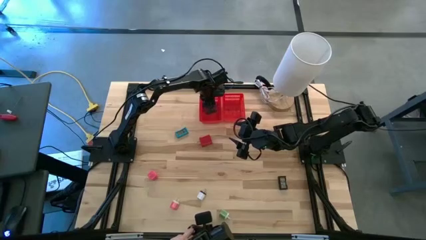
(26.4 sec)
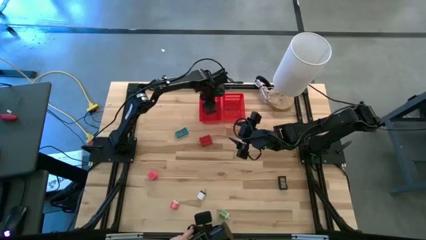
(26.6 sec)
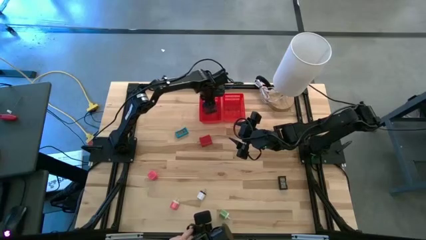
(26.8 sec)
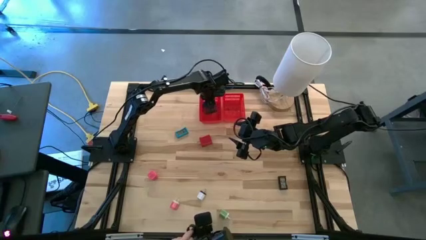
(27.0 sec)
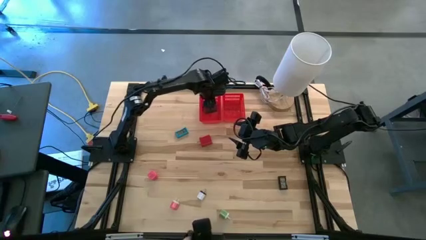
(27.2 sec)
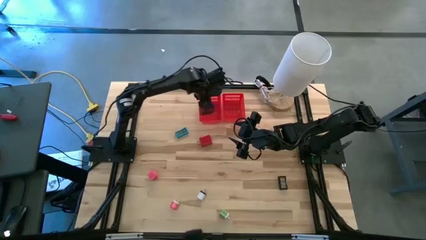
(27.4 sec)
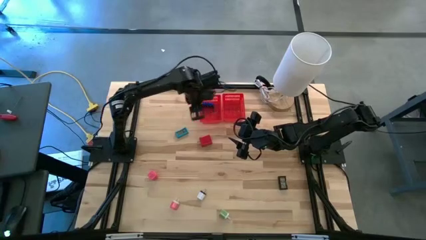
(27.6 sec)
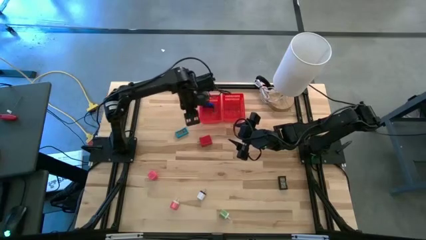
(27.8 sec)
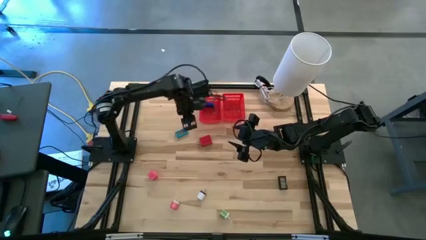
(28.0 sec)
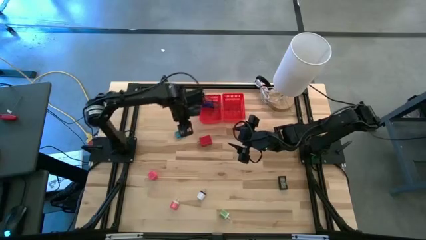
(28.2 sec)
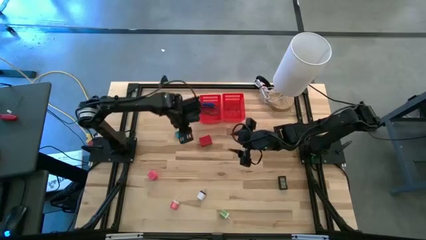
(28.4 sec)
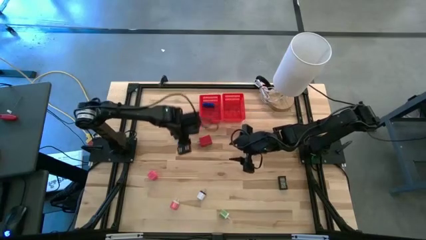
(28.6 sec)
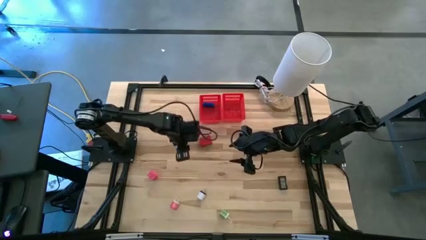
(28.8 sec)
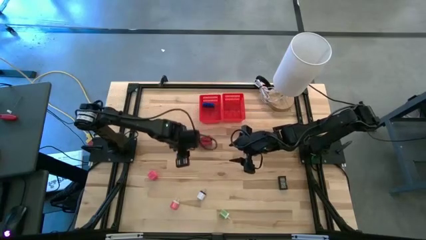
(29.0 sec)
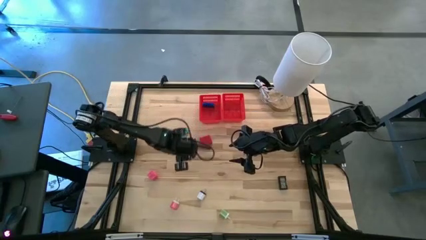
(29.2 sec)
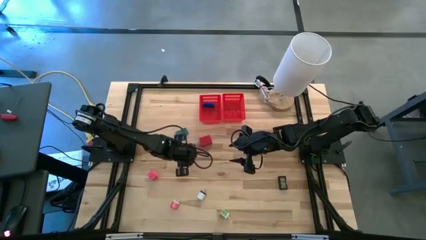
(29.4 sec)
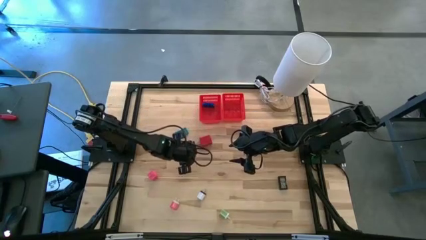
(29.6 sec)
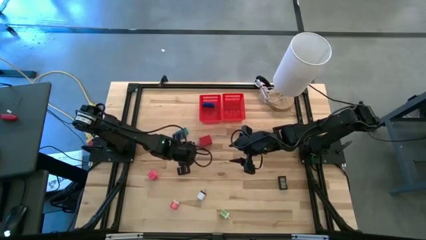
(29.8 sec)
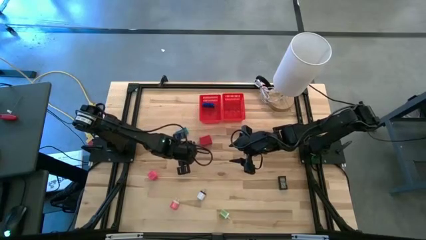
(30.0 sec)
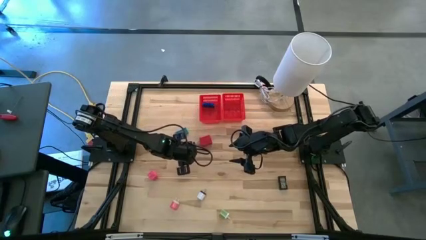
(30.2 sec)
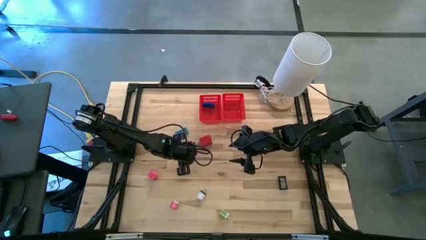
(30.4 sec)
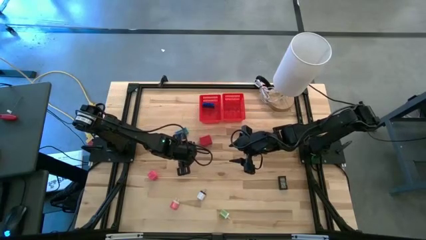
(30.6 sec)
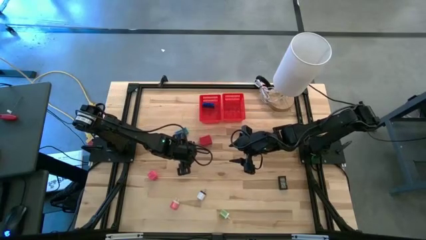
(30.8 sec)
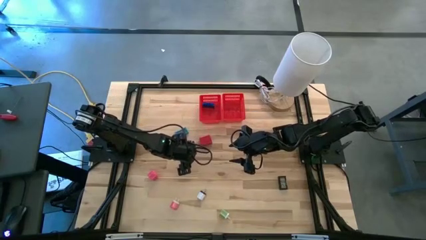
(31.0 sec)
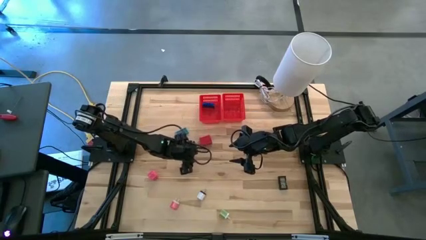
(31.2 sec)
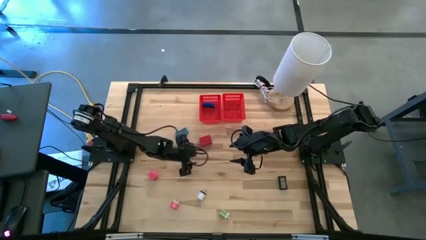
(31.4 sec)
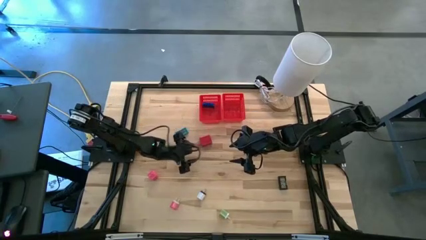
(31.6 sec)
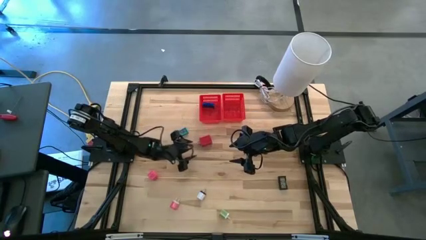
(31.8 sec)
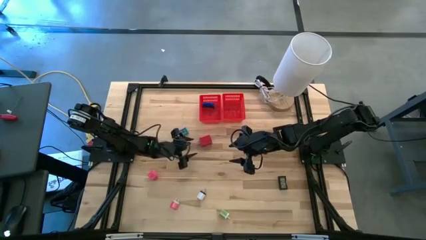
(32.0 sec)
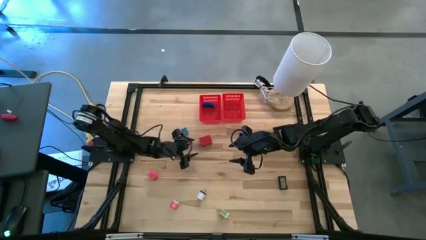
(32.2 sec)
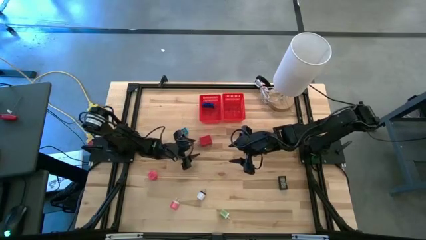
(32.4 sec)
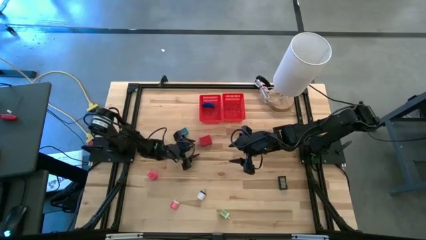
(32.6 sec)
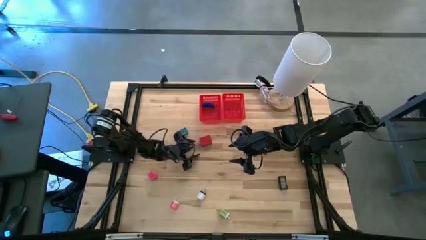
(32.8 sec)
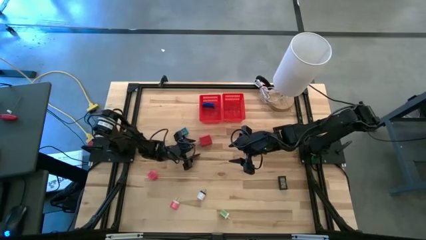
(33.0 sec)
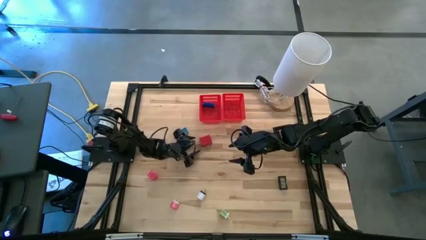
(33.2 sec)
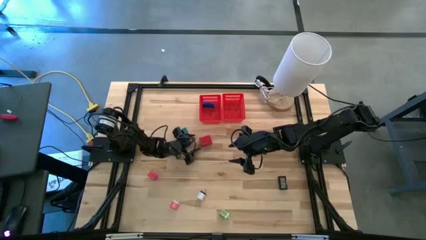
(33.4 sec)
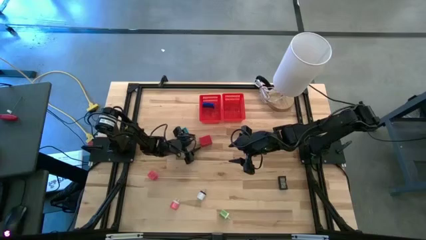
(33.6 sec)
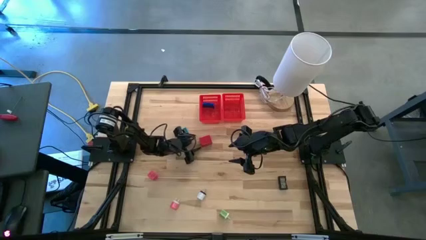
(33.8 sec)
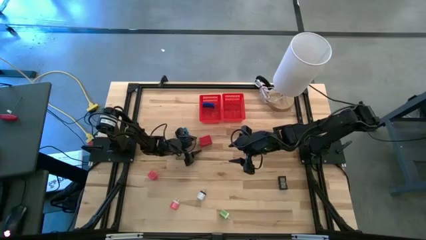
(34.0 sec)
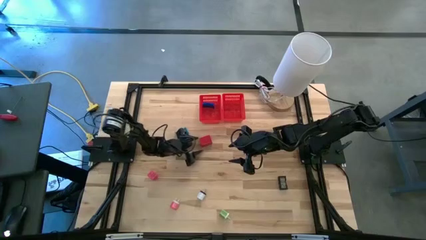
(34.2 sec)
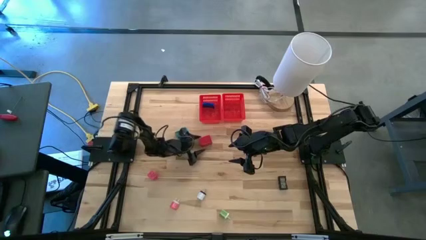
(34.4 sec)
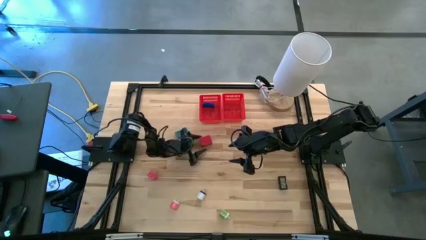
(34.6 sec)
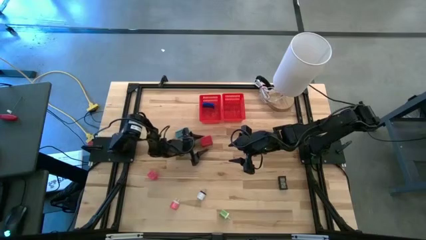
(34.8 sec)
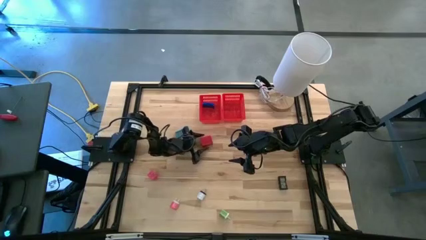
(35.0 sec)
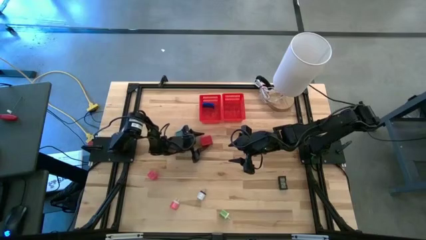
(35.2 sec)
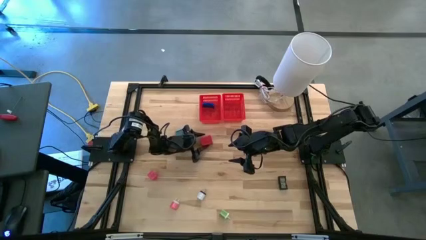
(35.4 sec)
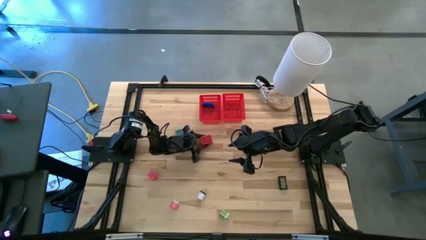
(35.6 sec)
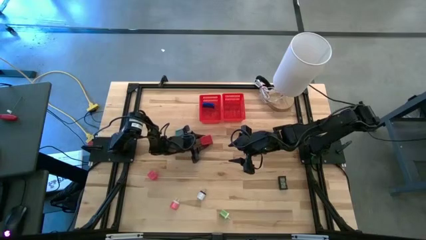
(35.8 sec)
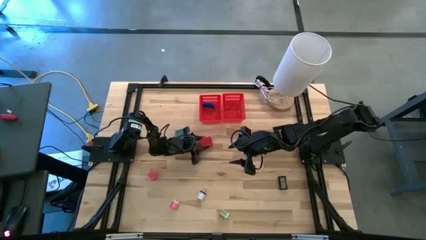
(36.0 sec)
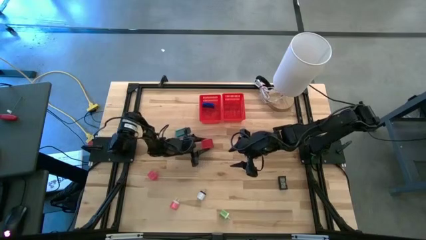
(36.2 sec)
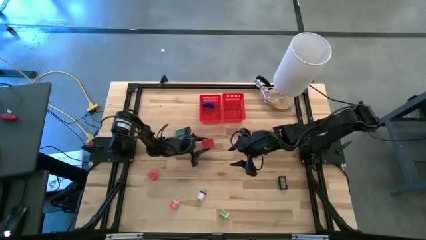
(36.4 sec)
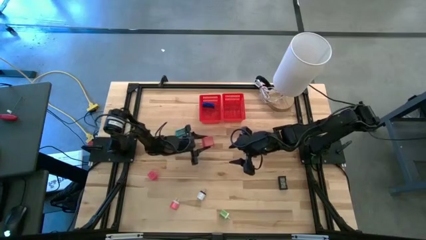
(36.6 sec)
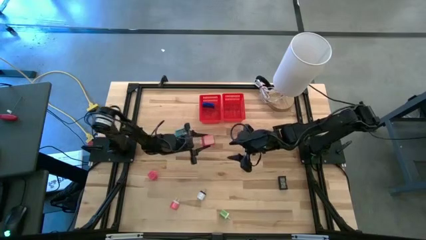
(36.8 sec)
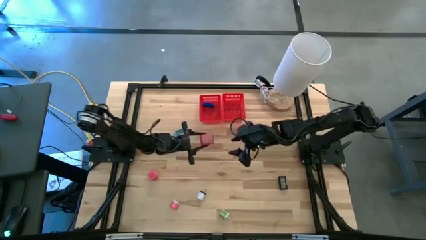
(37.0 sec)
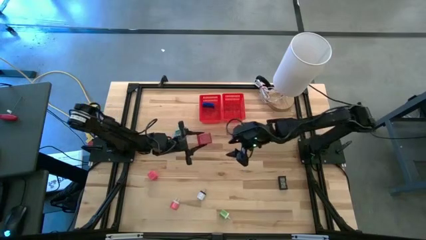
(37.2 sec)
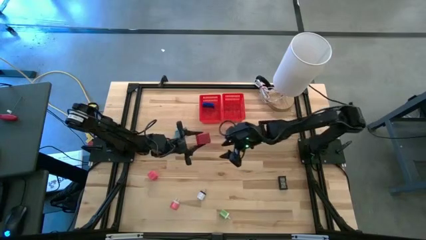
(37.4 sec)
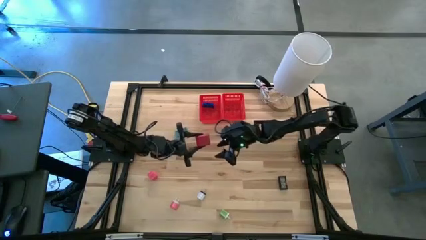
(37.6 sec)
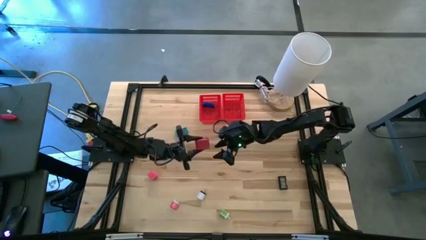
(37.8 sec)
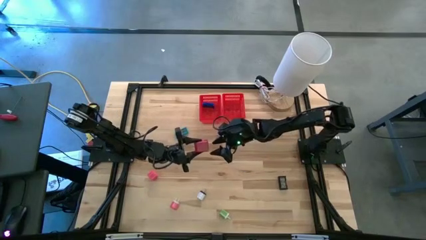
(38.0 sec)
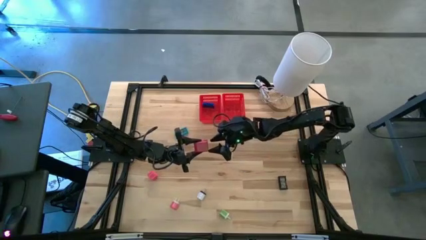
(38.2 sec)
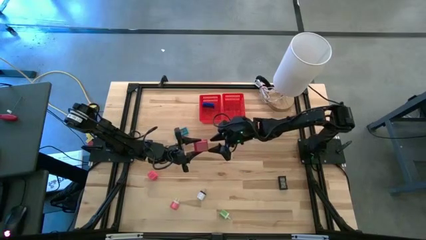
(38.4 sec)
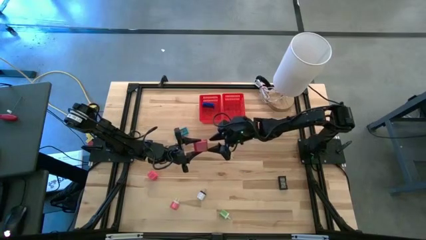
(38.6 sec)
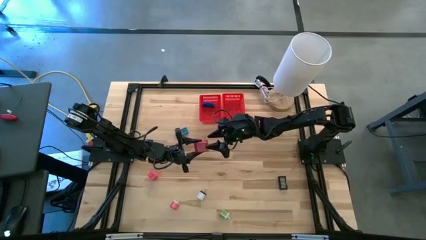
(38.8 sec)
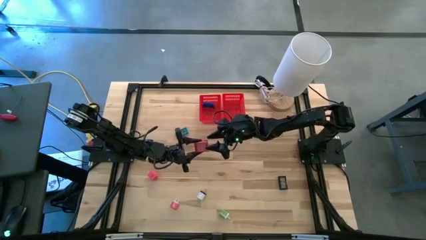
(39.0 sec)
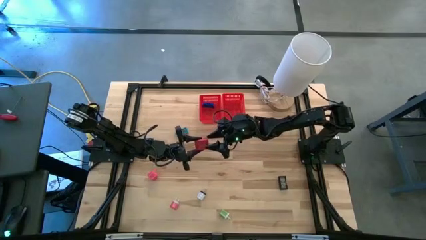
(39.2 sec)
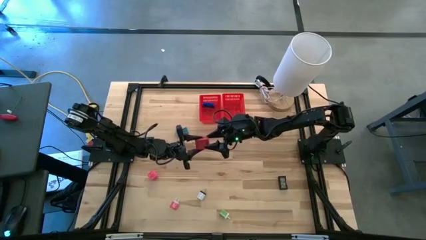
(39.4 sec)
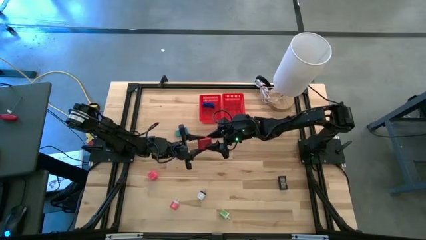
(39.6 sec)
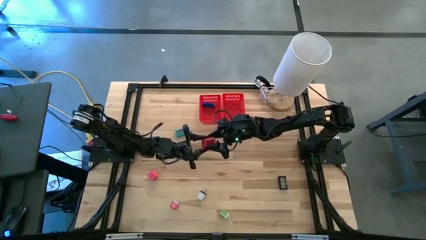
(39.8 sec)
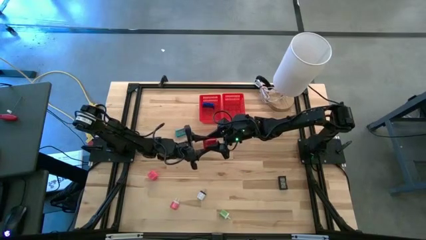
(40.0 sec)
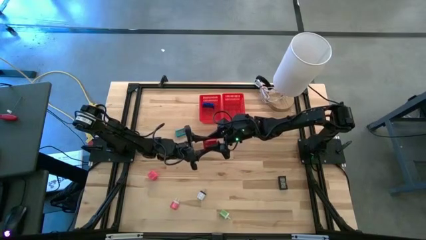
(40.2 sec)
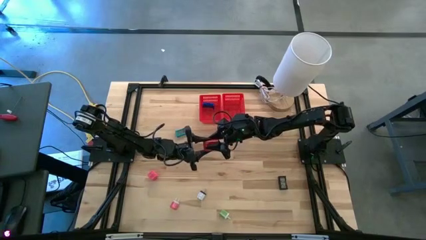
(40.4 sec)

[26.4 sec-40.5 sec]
Task: Pick & Place Office items
Put the red charger adapter into the right red bin
